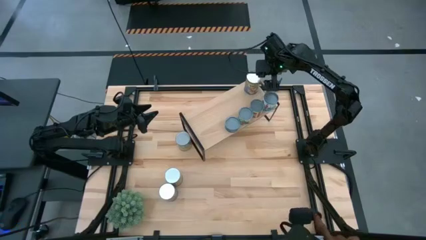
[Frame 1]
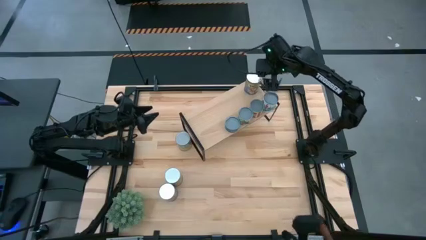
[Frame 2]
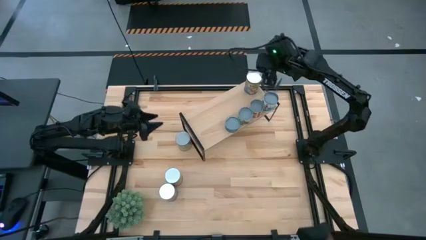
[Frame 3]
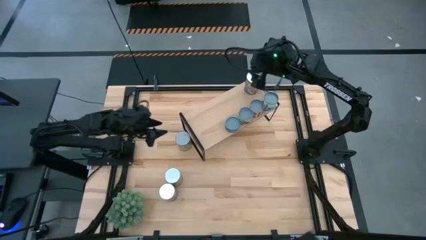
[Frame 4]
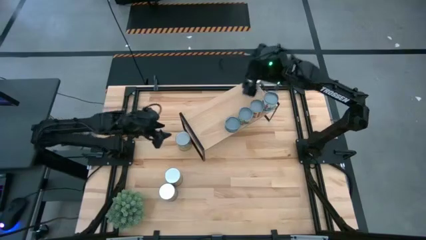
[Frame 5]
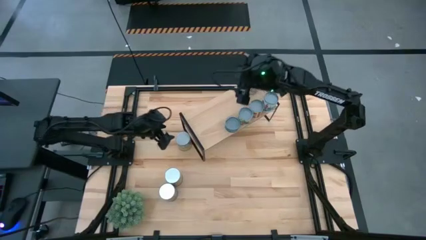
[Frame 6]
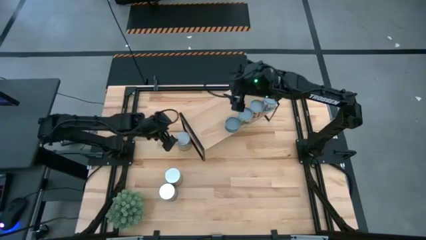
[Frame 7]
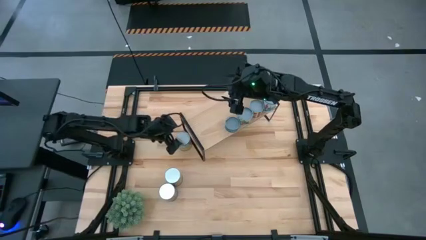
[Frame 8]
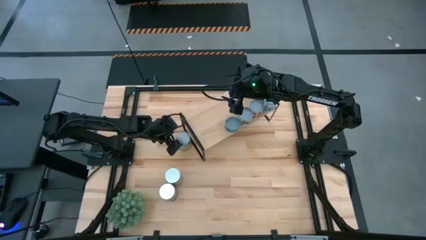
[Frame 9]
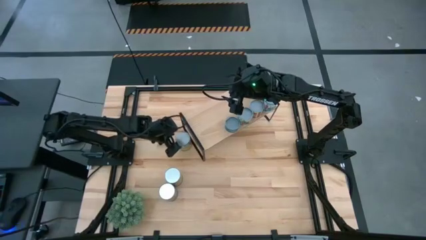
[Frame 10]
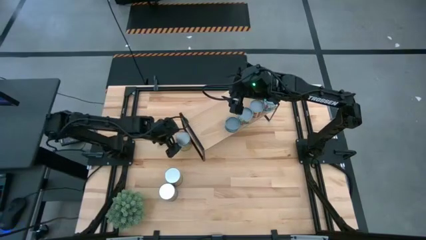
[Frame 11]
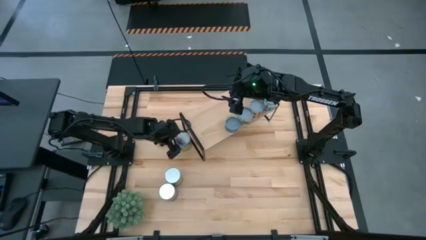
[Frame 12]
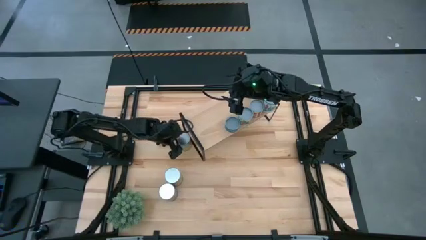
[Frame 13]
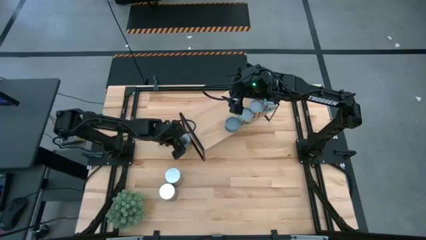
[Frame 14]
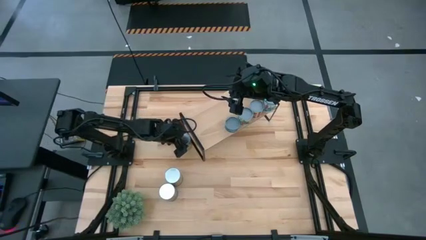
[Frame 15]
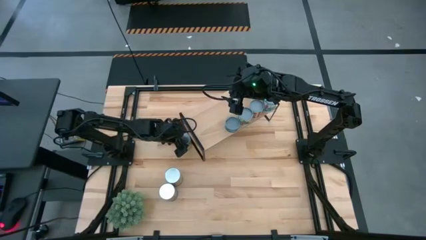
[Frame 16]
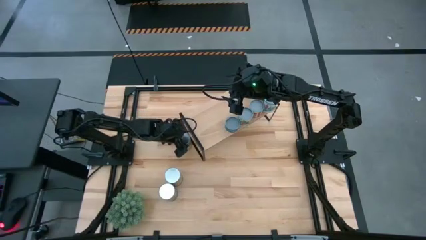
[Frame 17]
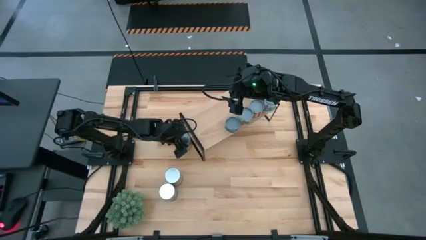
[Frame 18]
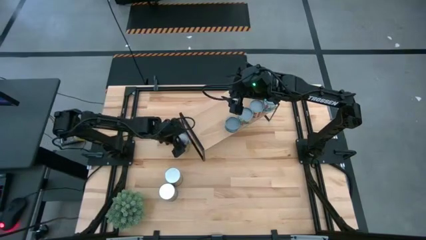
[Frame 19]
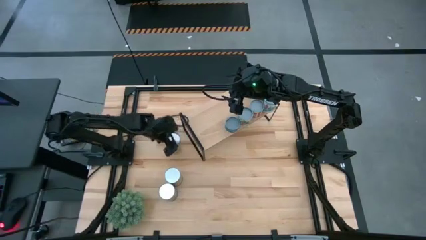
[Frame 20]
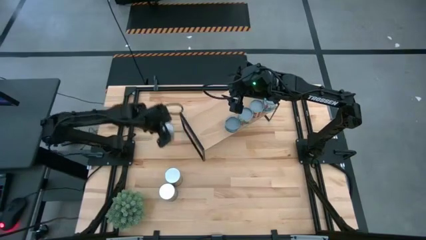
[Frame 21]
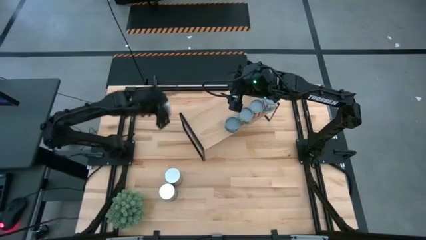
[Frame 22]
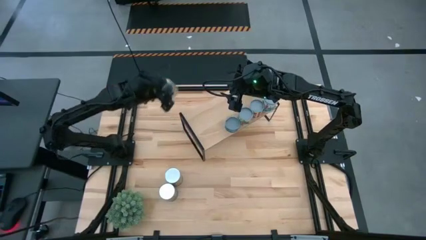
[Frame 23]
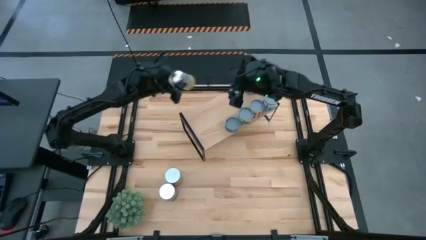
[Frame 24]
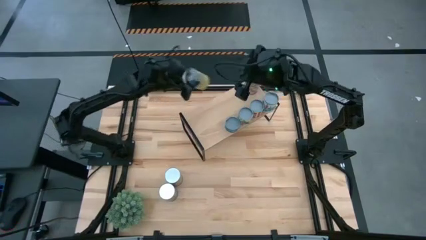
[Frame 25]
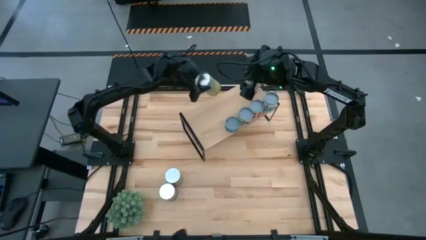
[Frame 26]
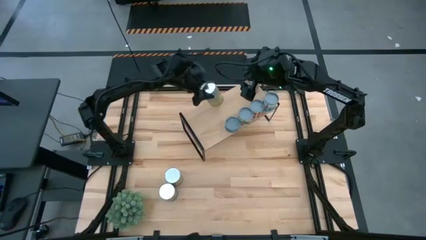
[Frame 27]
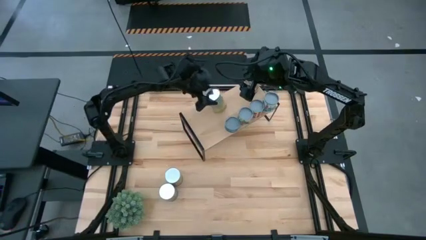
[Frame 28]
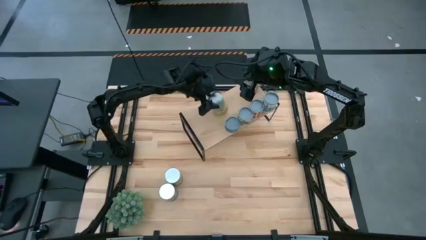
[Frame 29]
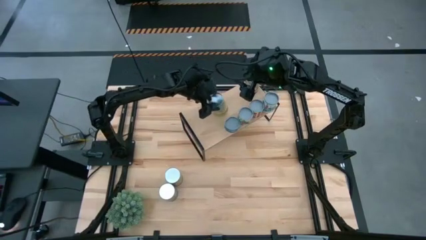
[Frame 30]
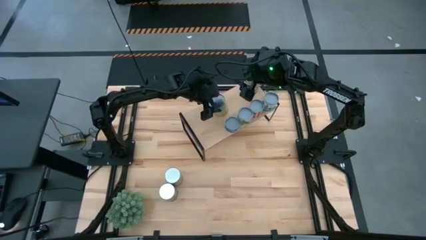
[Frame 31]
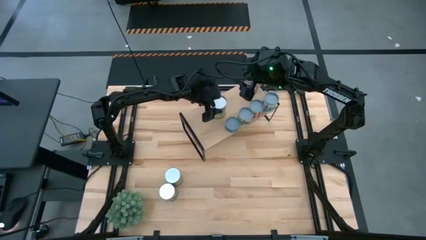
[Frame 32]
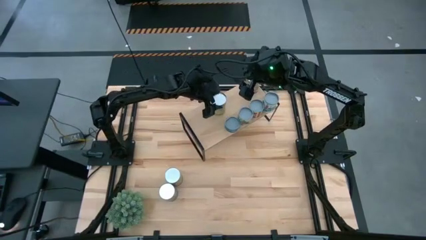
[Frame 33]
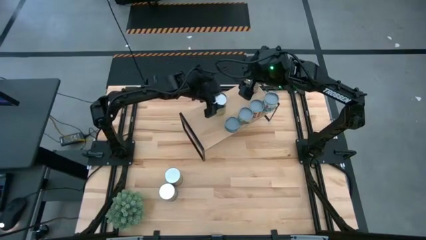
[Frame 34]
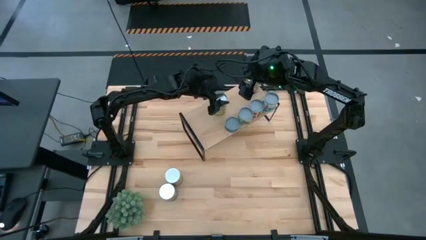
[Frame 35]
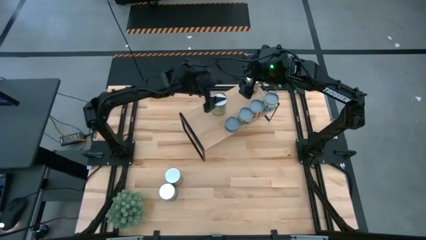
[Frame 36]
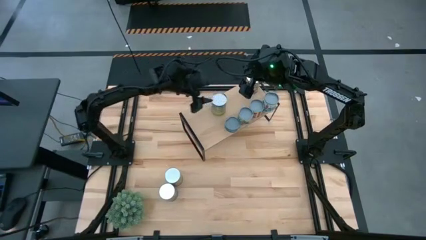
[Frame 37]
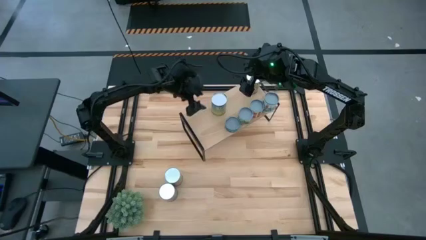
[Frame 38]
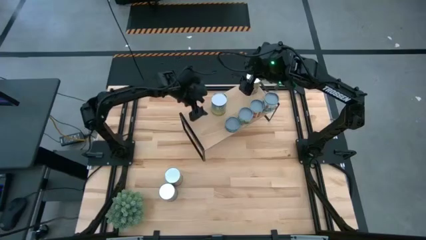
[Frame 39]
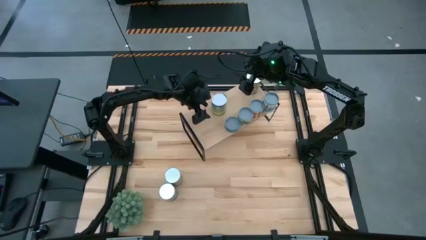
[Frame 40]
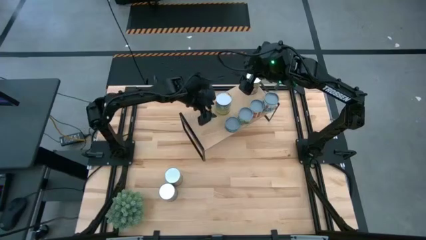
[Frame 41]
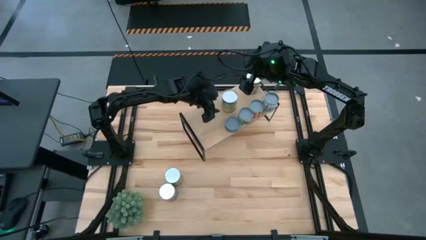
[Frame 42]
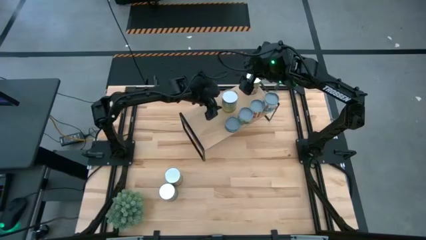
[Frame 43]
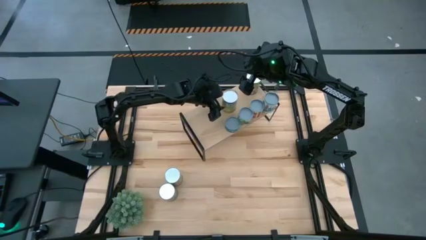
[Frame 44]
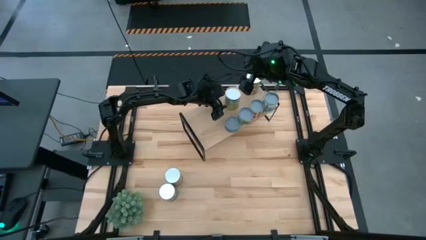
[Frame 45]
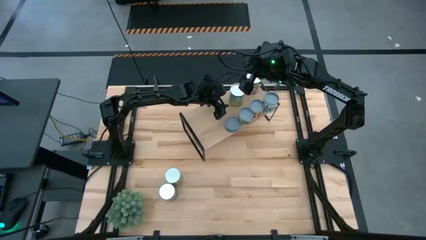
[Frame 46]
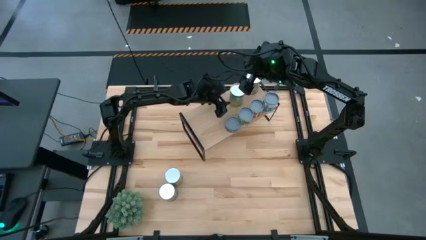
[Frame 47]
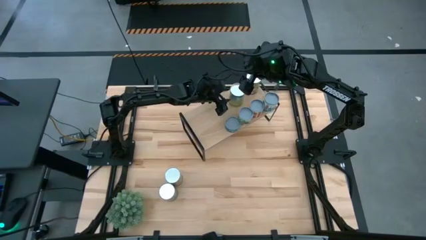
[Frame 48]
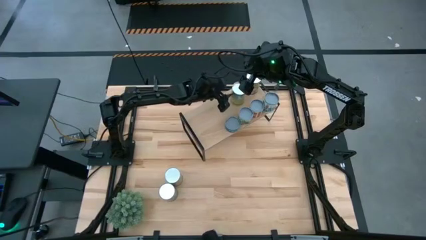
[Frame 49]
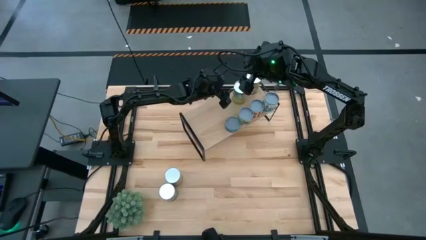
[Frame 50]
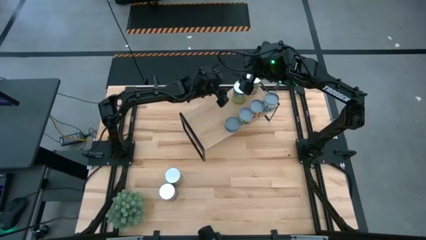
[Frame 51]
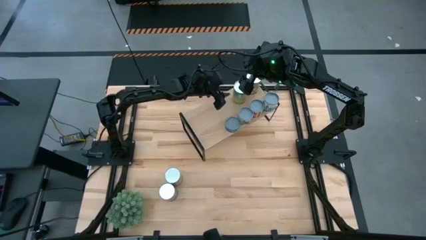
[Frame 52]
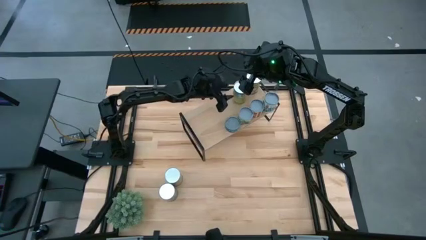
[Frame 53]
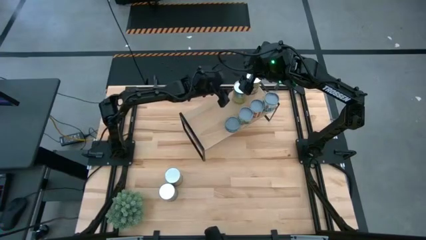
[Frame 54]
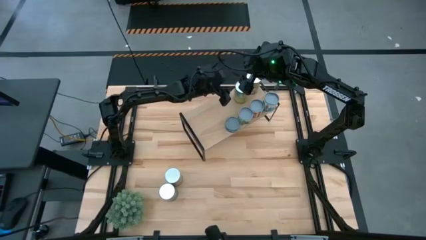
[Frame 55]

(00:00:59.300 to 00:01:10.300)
Task: Pick and place cans onto a shelf
Put the canned carrots on the shelf
